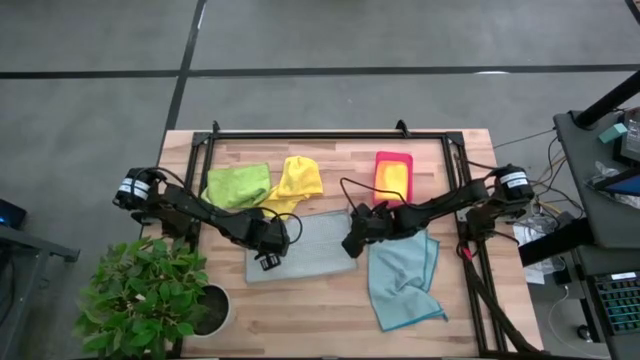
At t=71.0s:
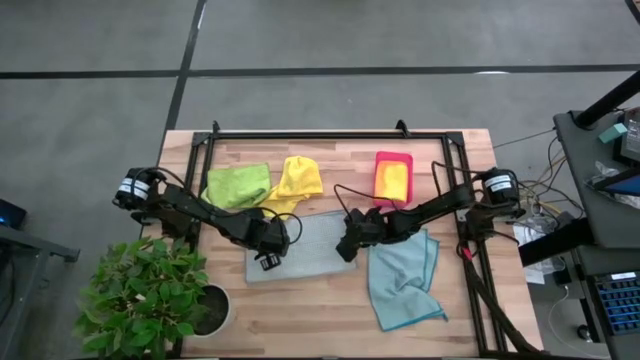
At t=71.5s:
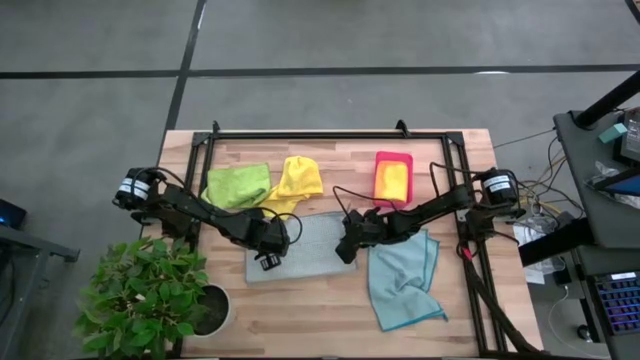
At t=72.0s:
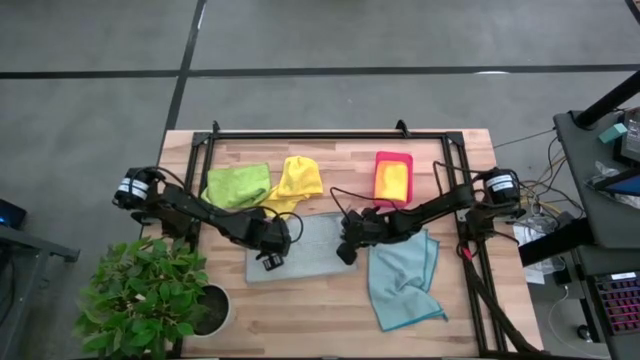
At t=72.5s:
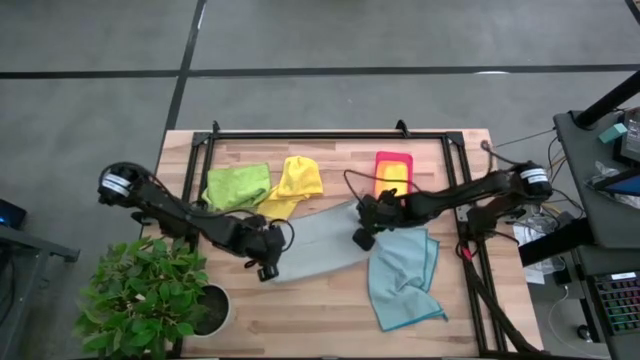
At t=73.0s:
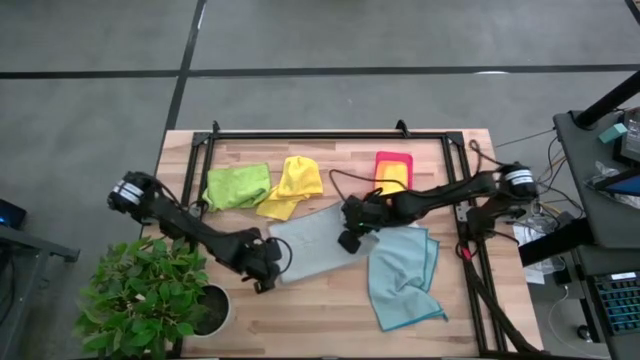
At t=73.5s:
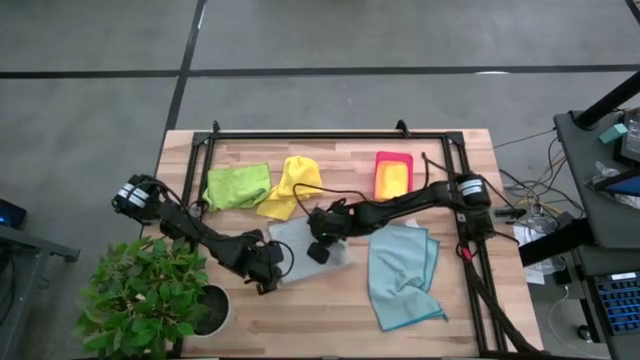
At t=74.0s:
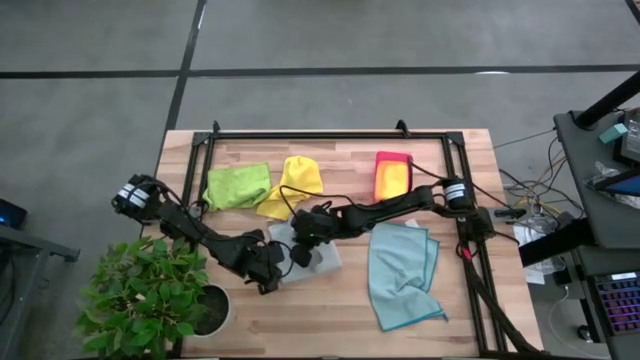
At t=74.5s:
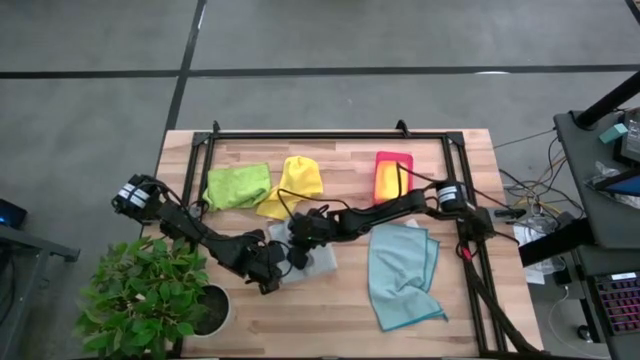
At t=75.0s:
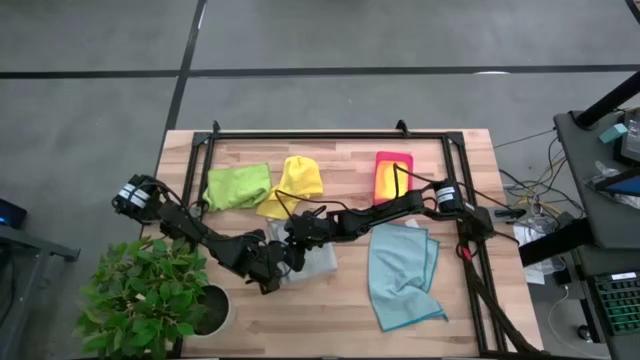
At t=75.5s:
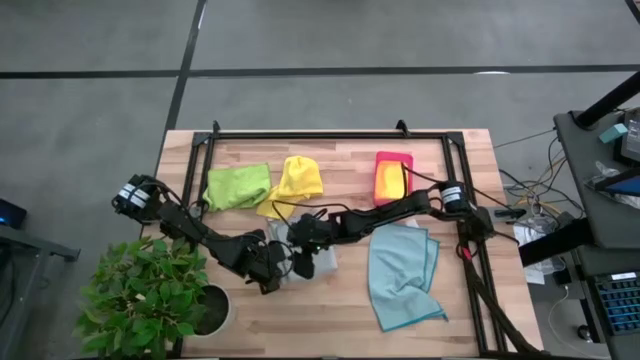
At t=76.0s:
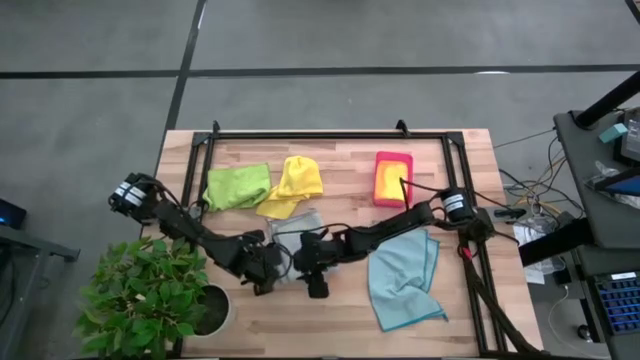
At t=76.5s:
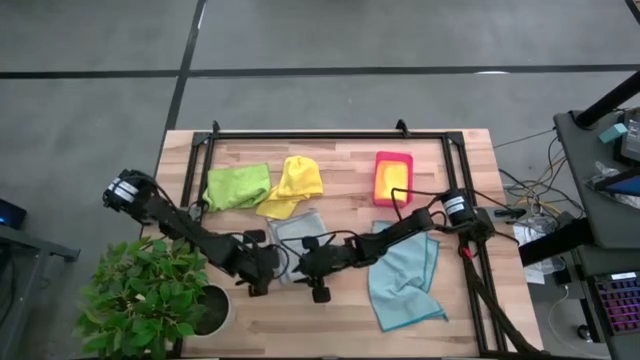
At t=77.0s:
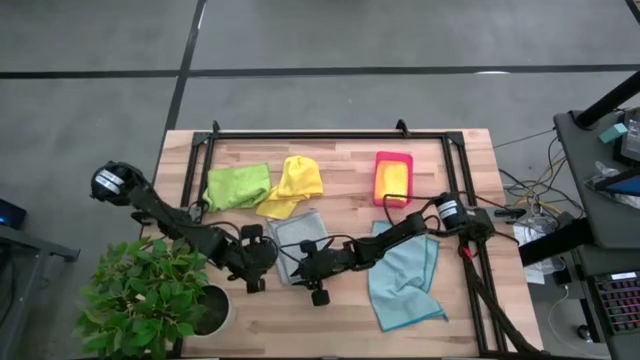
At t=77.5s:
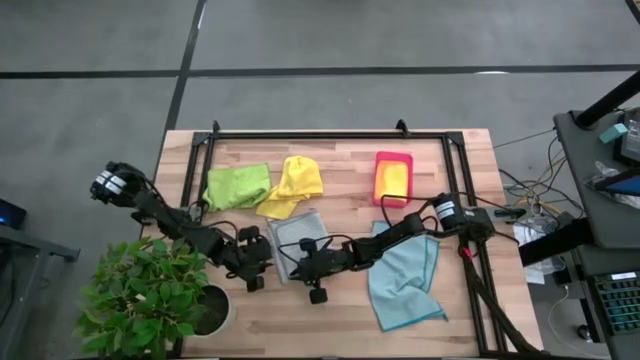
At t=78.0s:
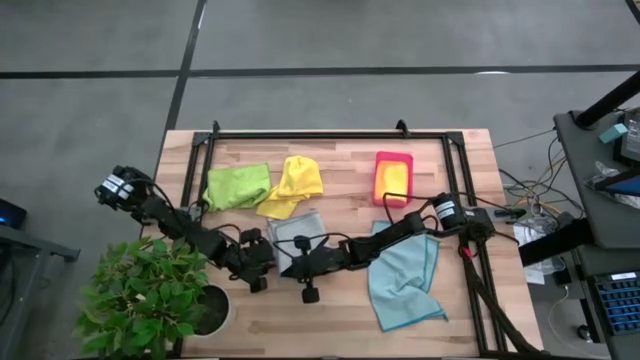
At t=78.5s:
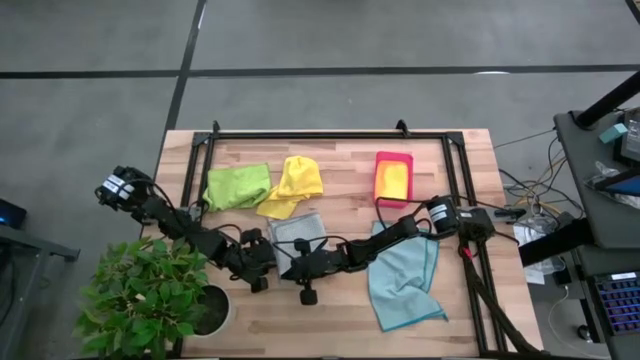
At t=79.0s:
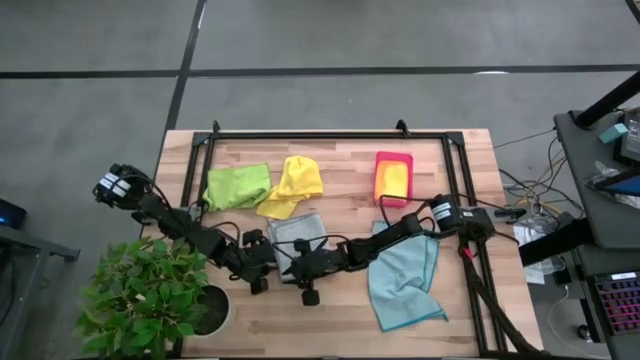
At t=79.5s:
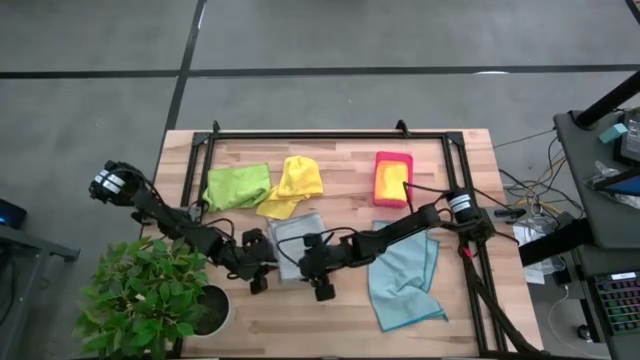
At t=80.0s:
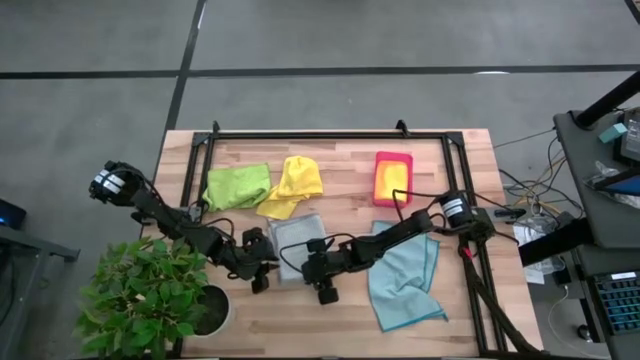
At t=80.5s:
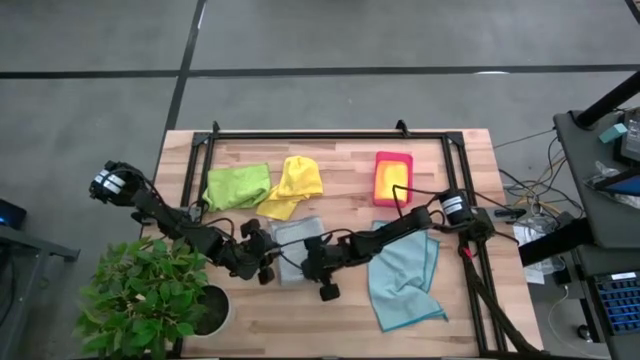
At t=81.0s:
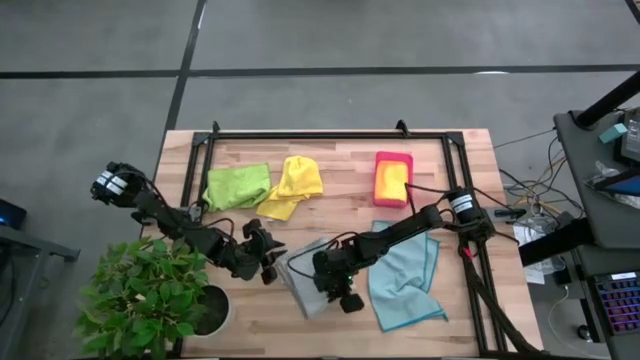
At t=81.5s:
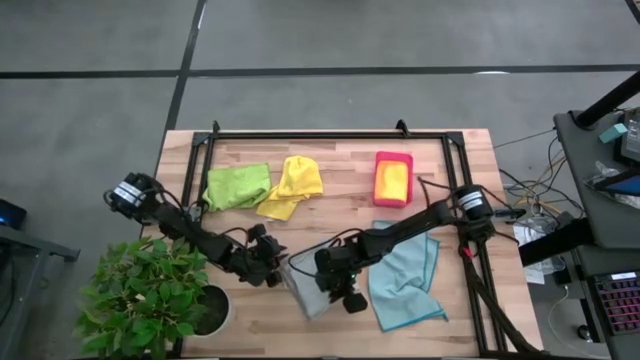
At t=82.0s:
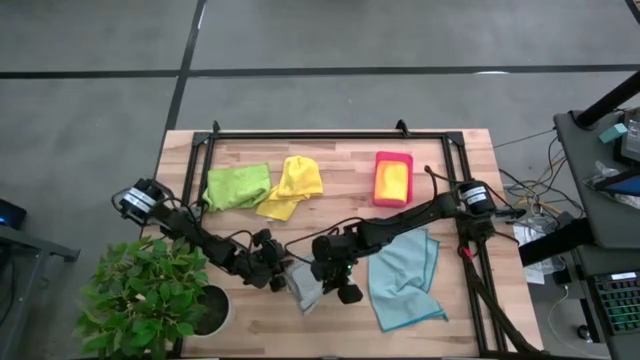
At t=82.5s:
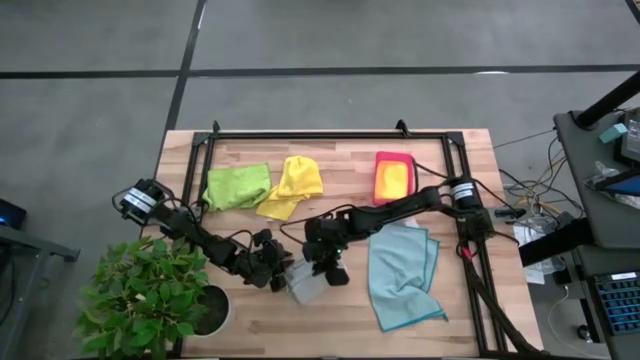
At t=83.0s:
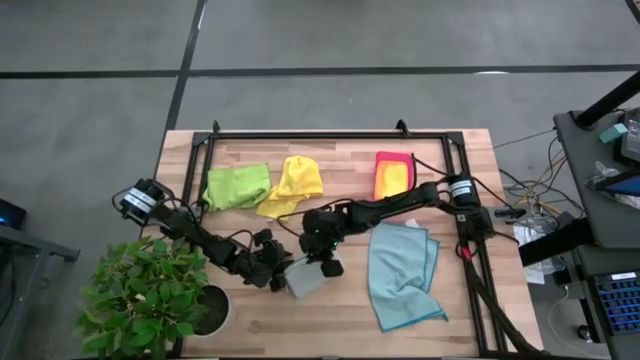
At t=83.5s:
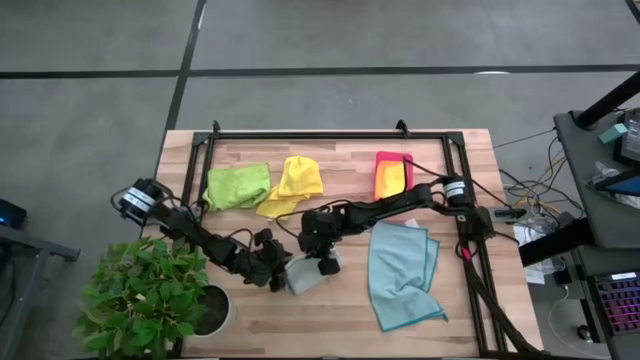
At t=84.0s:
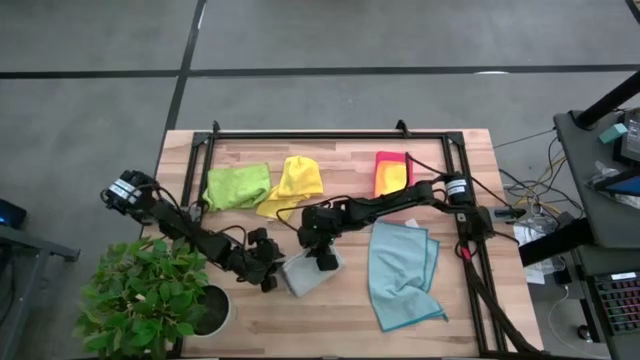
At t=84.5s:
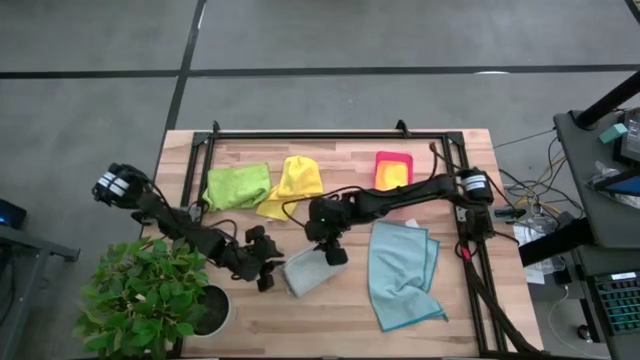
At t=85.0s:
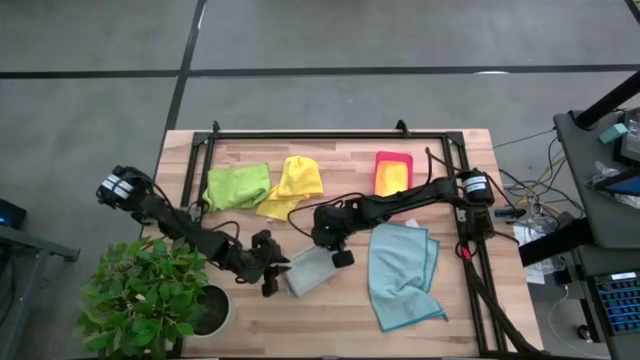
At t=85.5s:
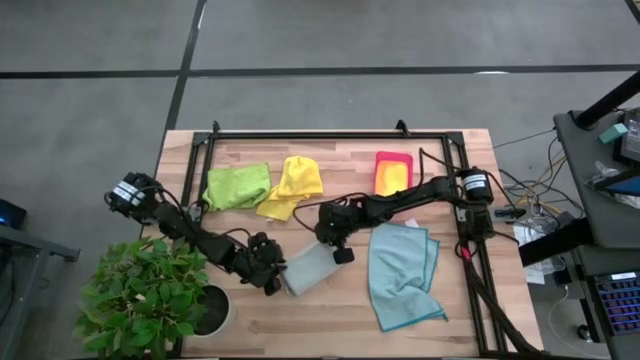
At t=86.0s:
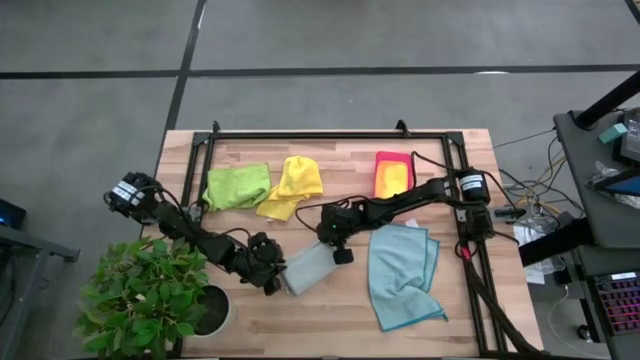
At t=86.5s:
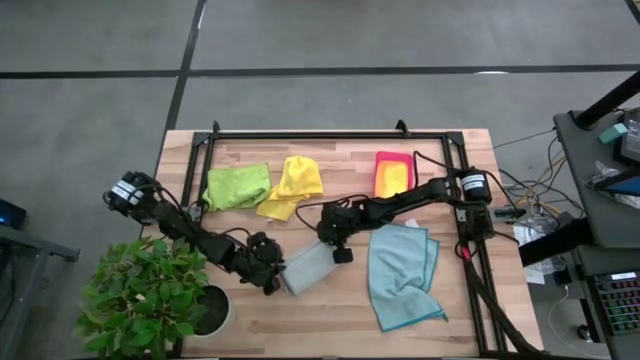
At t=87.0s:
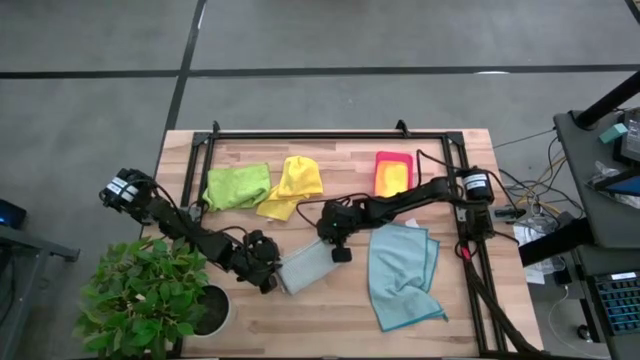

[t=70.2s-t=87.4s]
Task: Fold microfiber towels
Fold the gray microfiber towel

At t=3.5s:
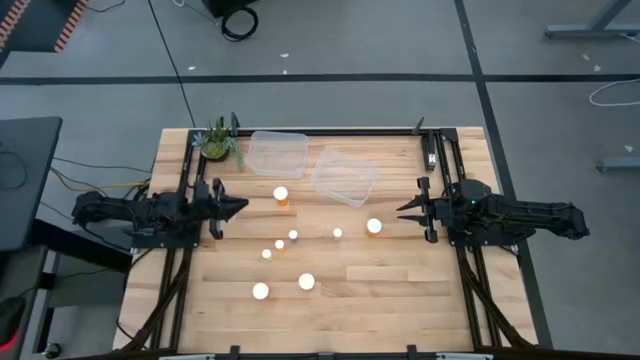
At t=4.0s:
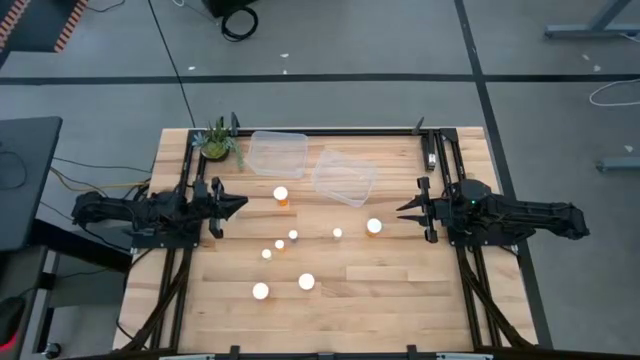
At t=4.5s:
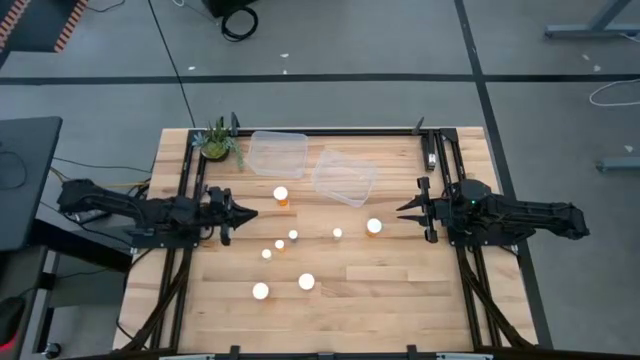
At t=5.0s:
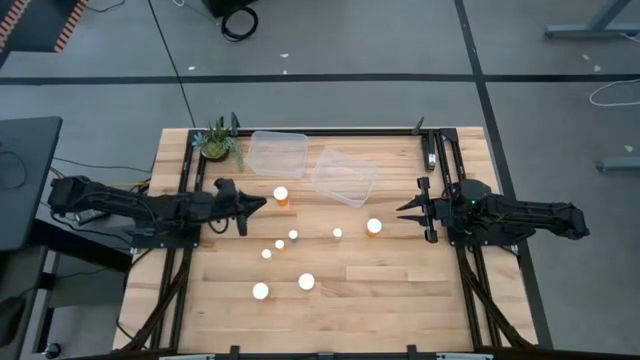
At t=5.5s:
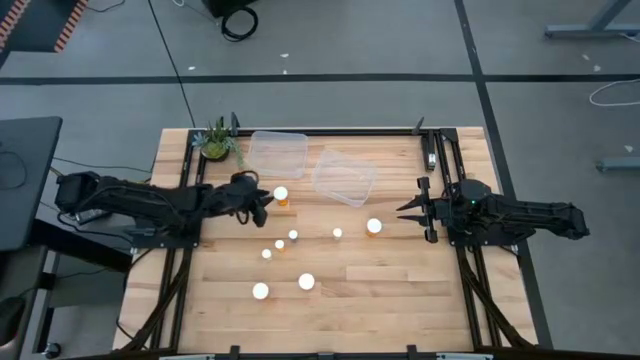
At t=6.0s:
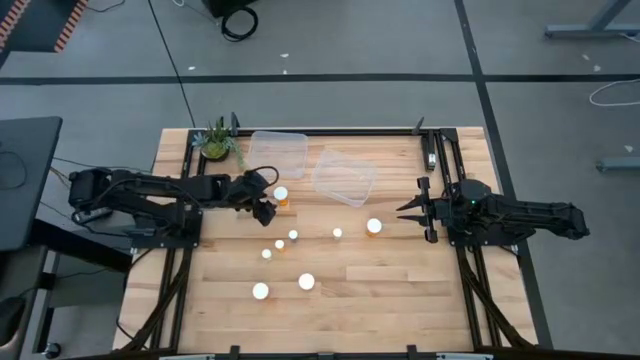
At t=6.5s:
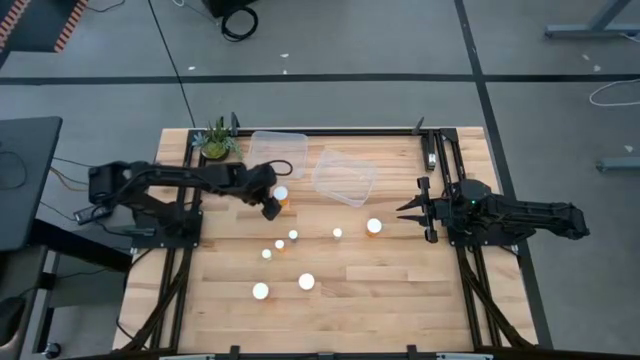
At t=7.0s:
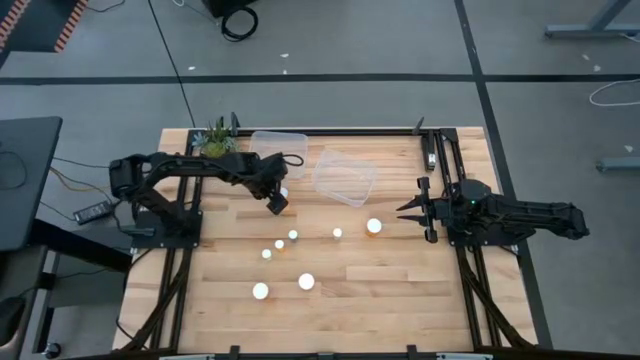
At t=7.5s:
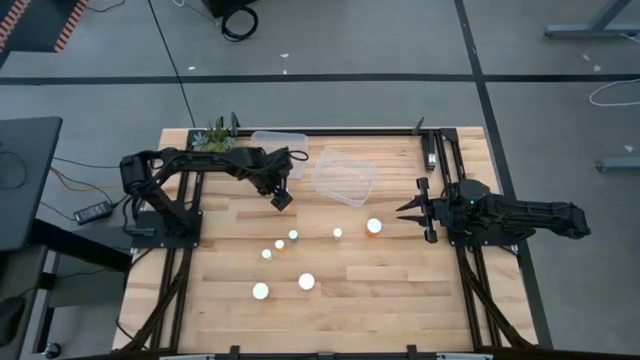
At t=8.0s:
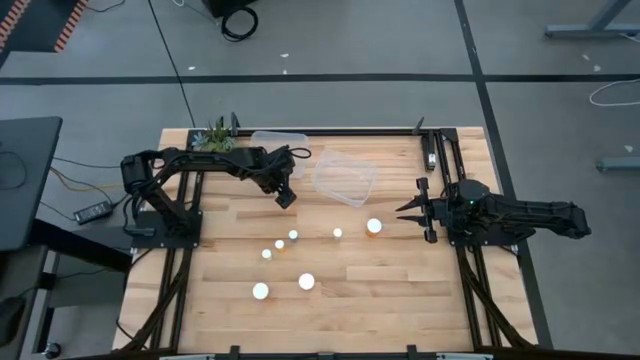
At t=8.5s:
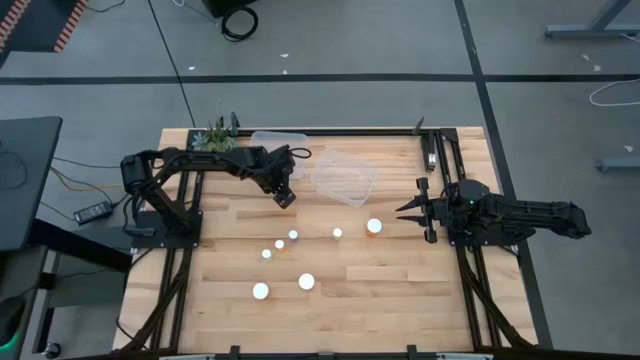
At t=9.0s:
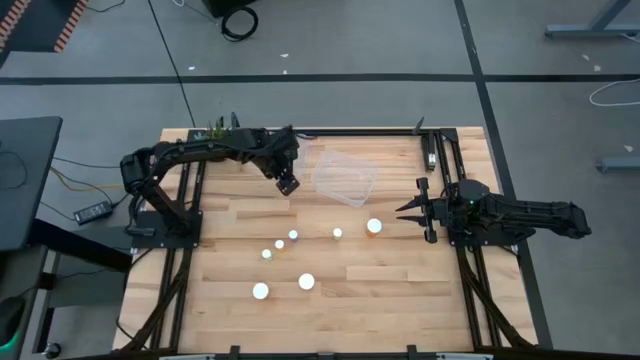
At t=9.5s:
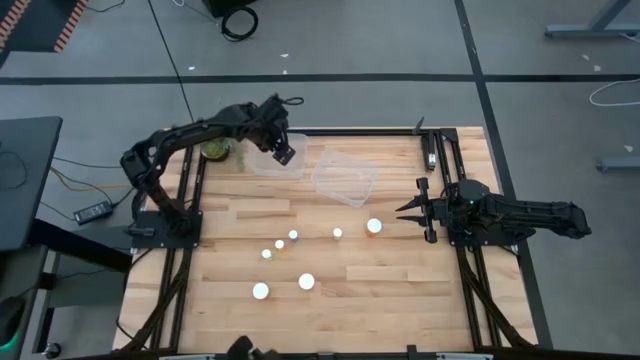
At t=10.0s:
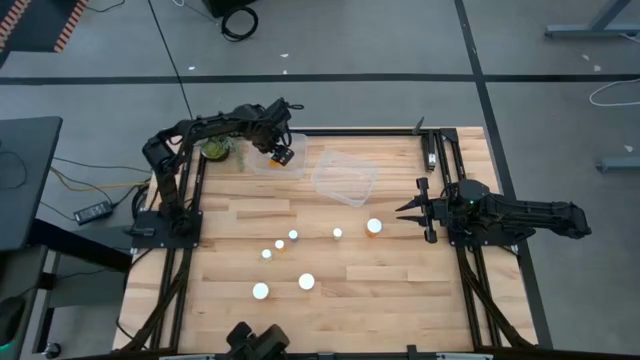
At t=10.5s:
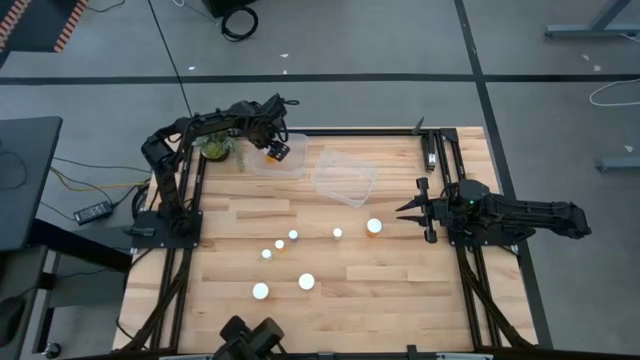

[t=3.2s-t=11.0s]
Task: Pick and place medicine bottles into bin by pill shape (circle, oval)
Put the top left big orange pill bottle into the left transparent bin
